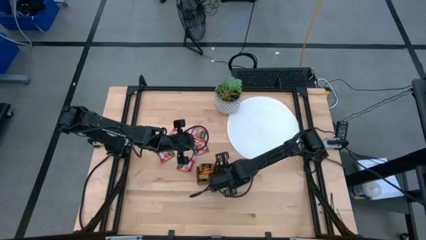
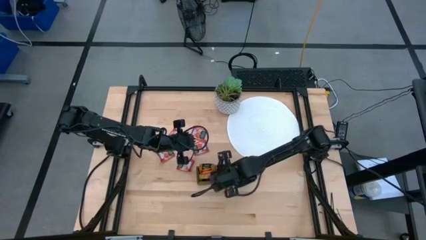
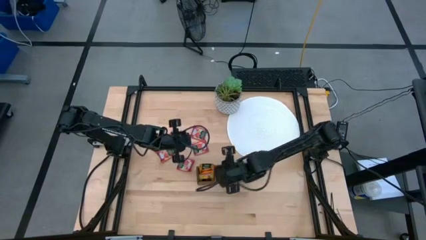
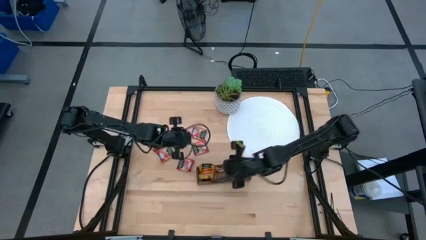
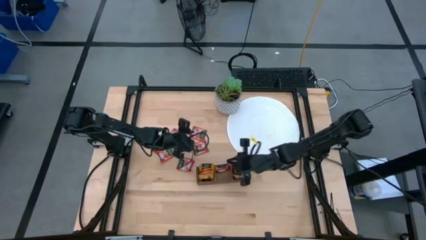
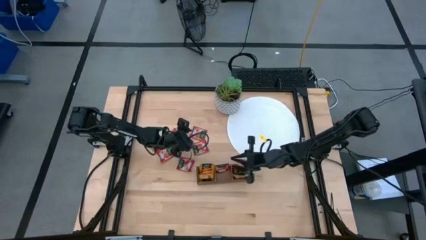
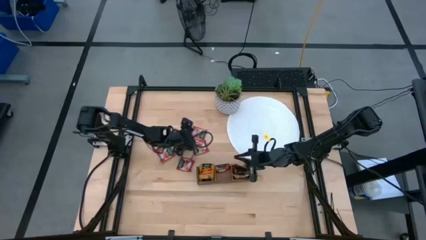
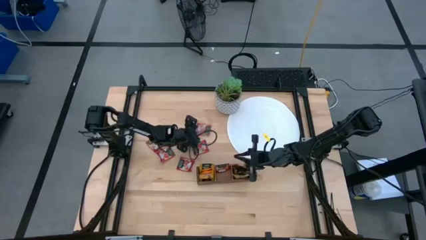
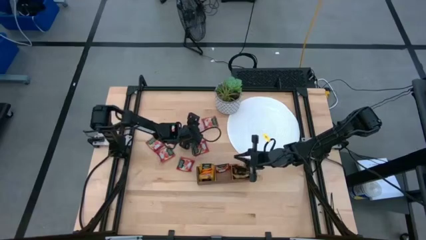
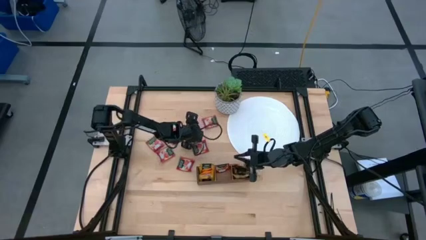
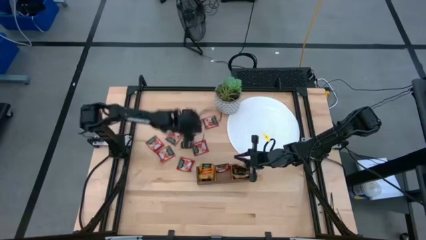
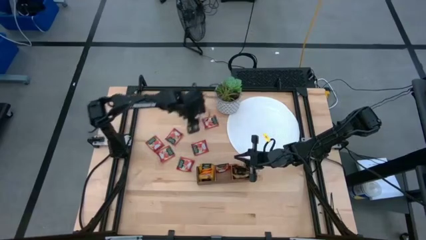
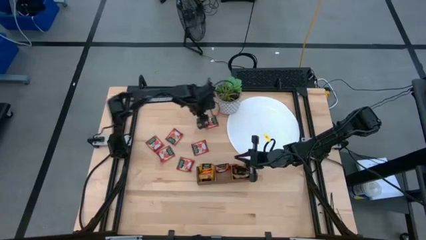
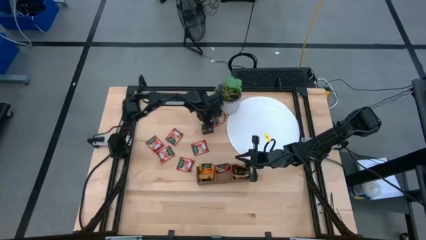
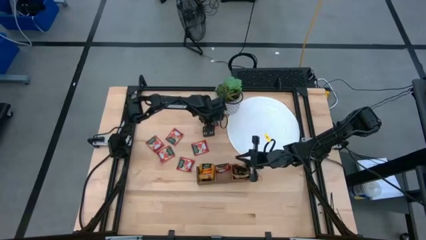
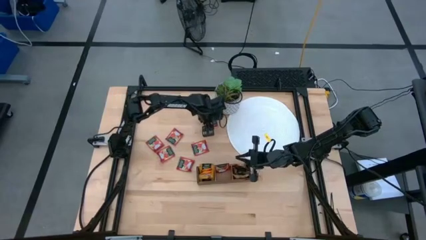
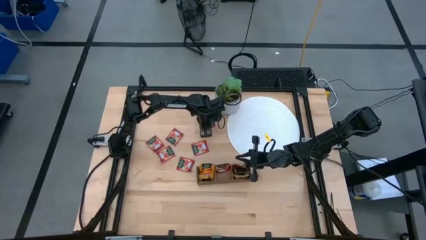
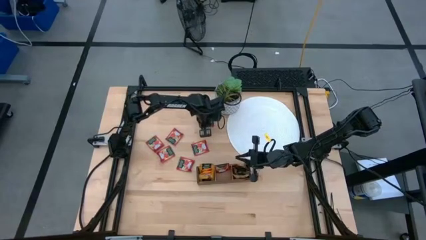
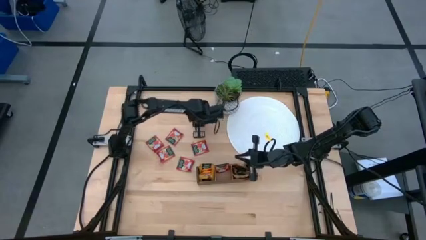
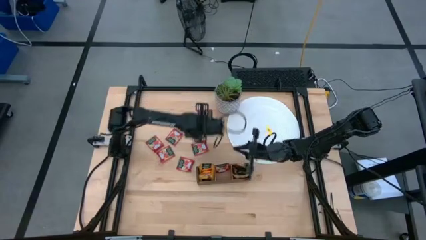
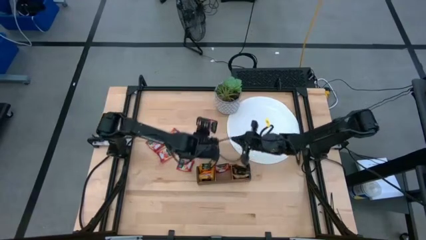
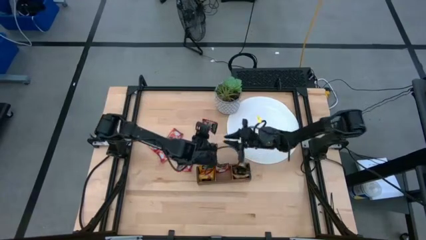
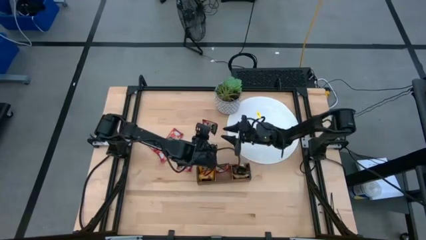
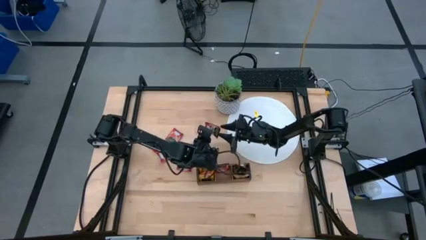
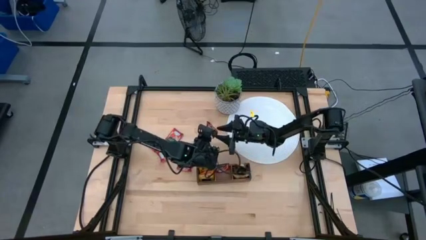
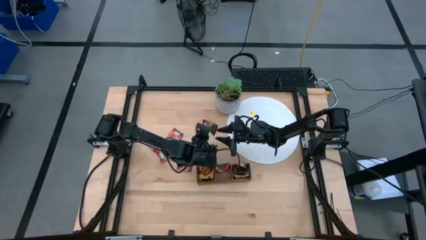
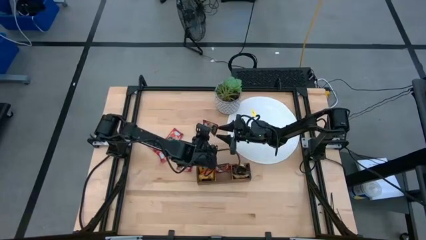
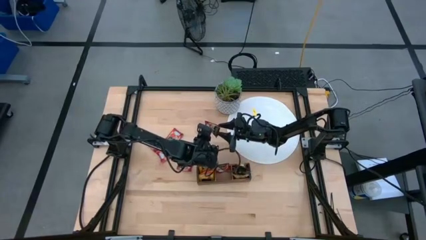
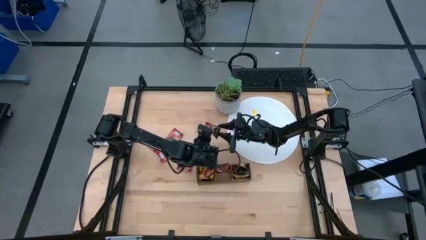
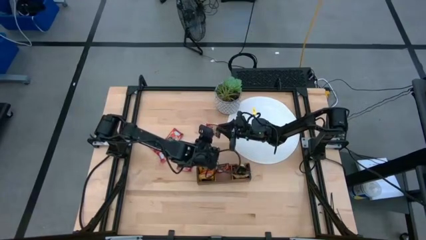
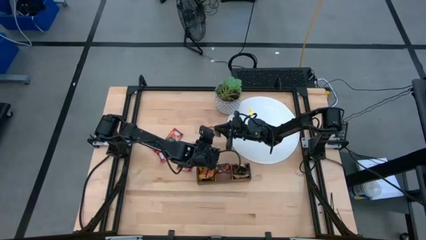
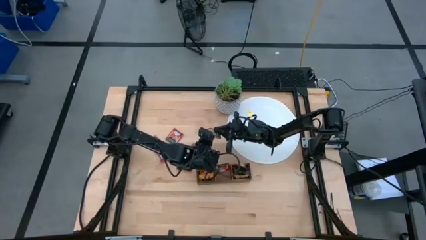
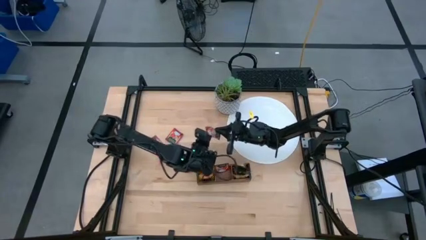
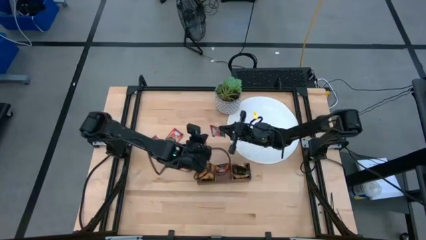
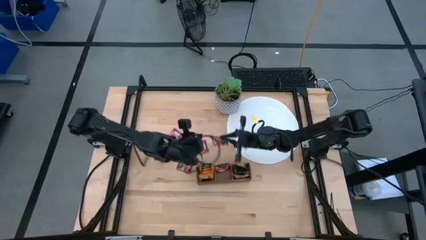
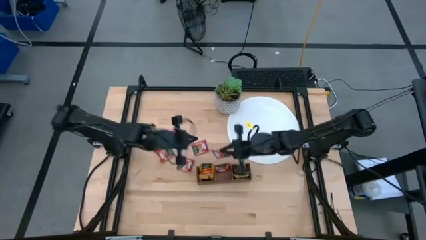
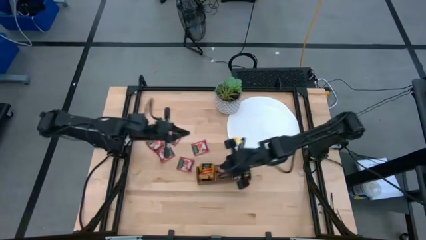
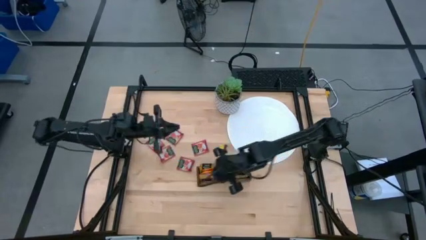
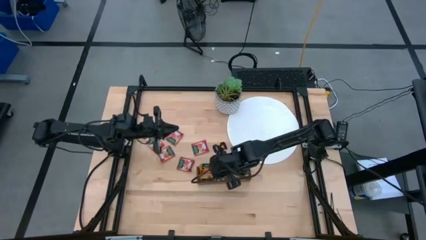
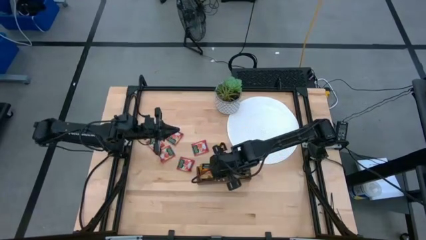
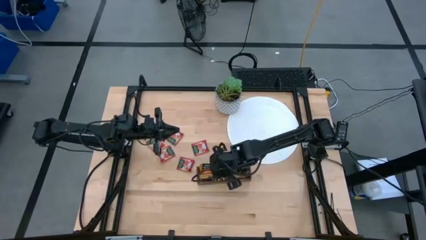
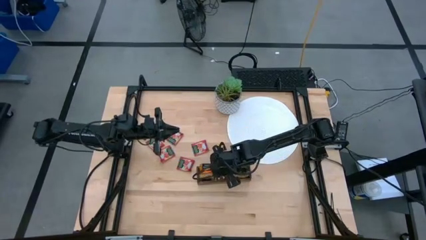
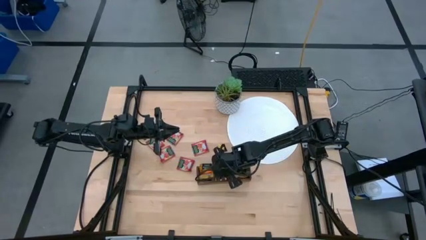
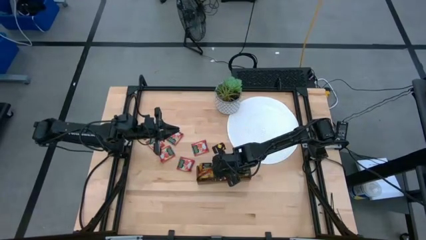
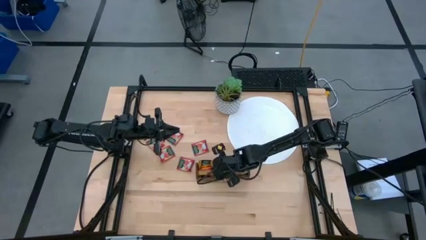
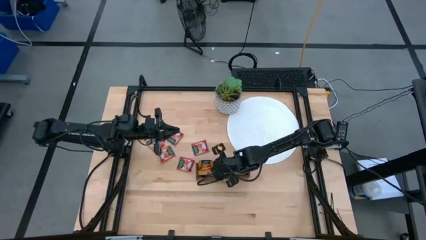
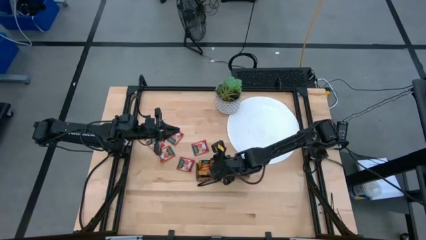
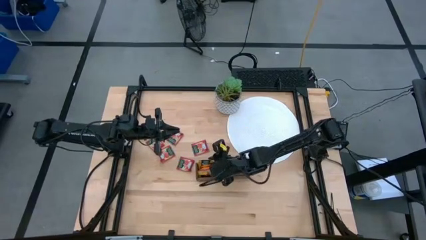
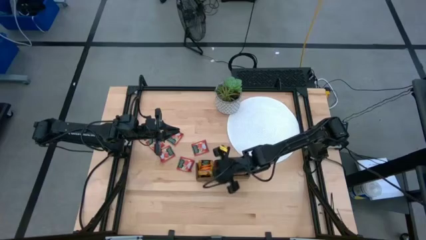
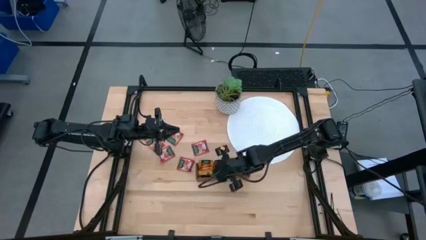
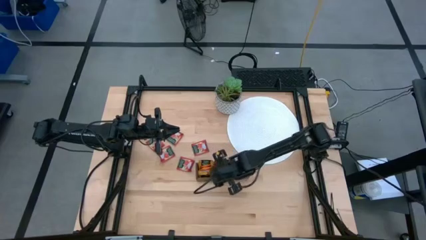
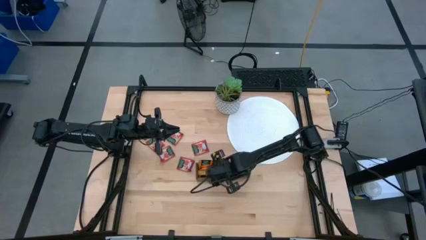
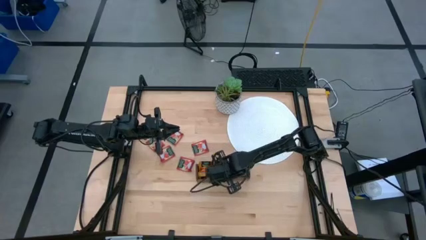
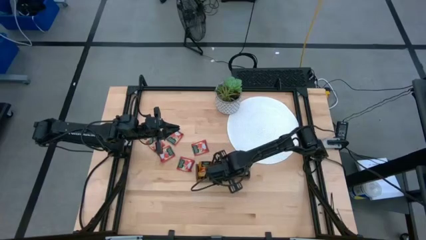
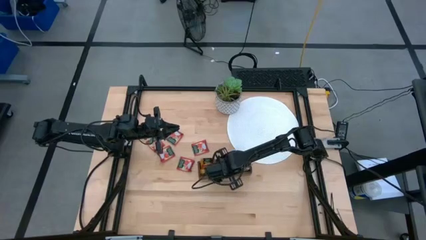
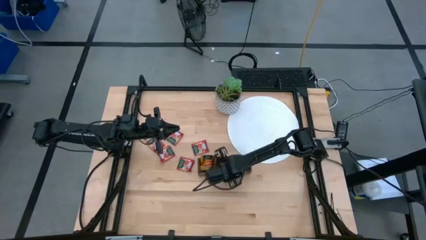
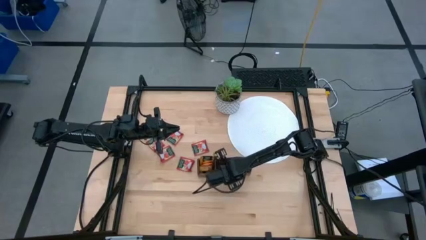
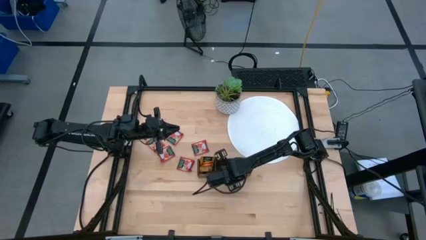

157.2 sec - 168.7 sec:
Task: Pick & Place Tea
Put the red tea bag into the middle section of the wooden organizer

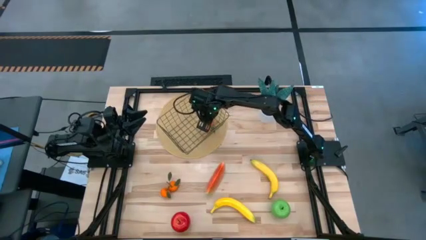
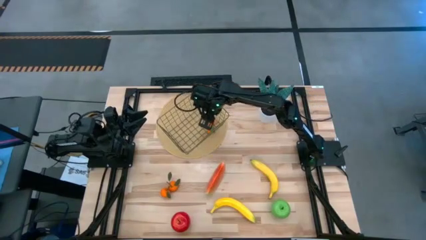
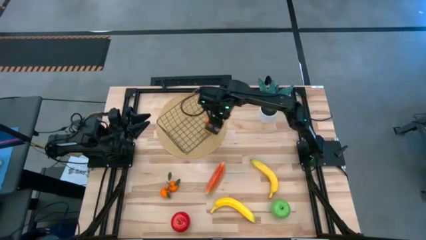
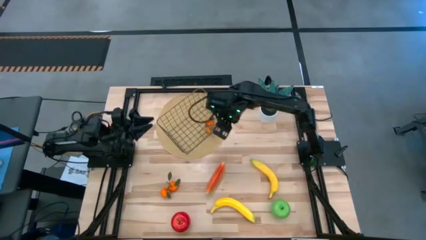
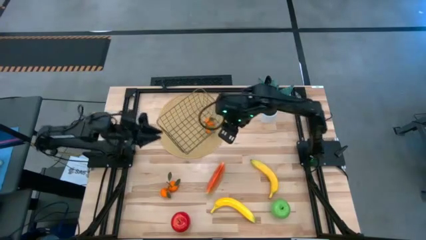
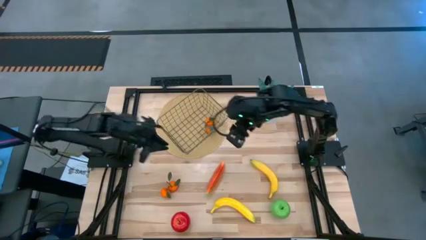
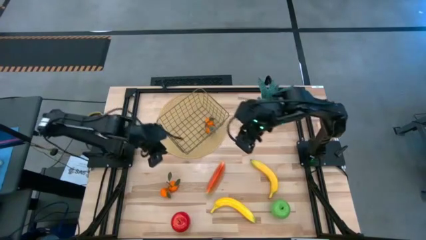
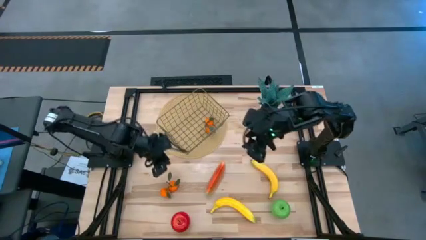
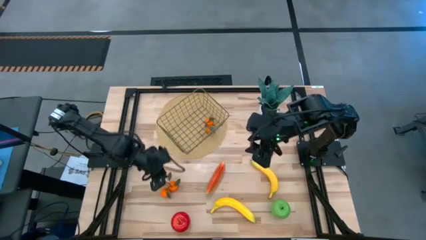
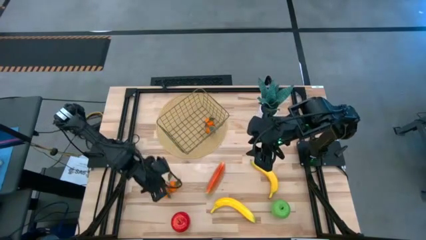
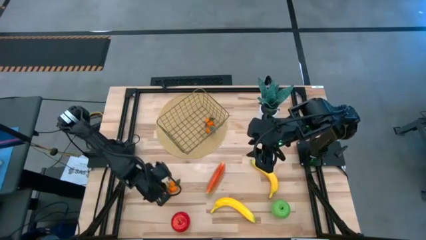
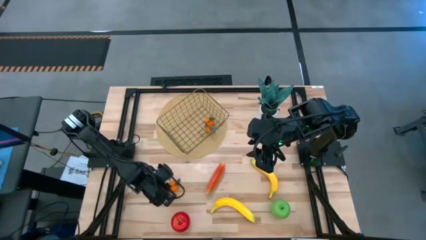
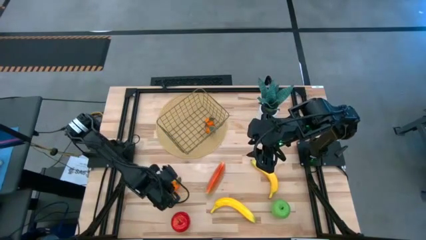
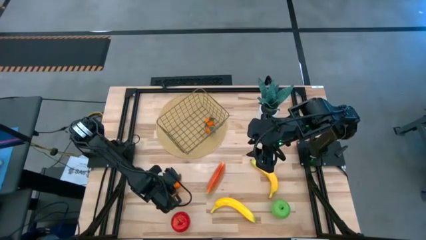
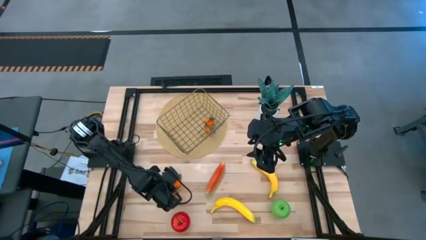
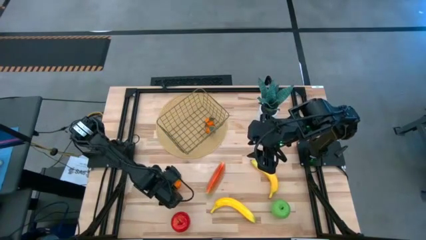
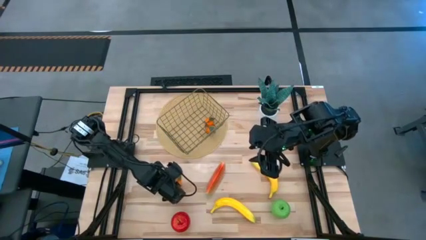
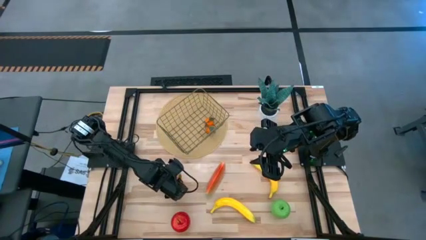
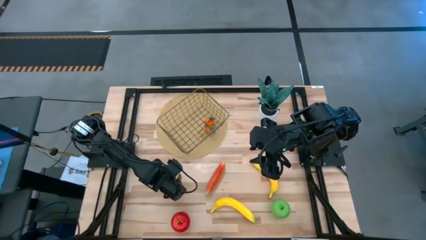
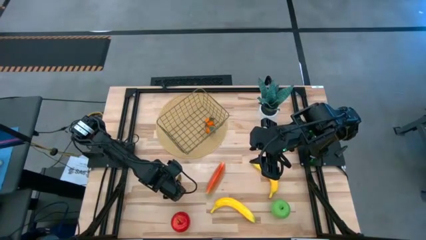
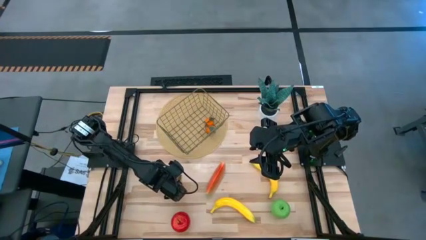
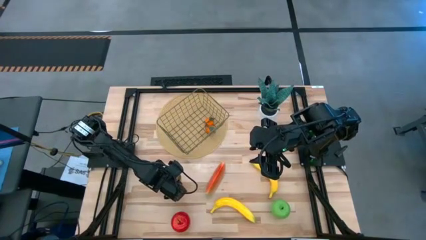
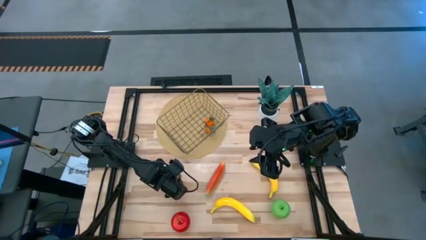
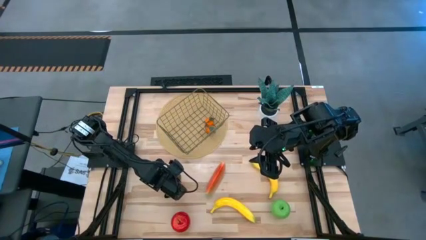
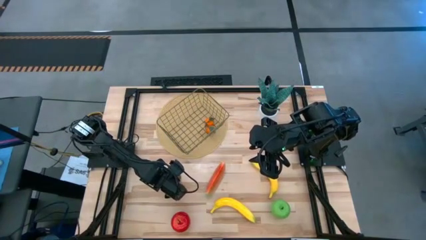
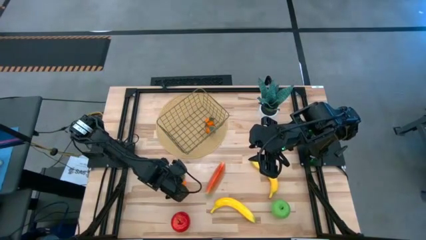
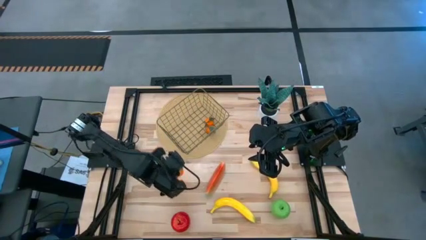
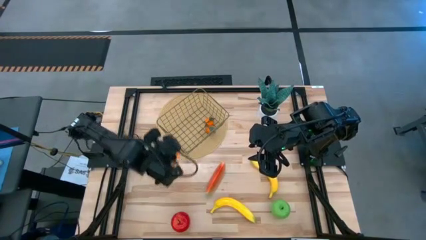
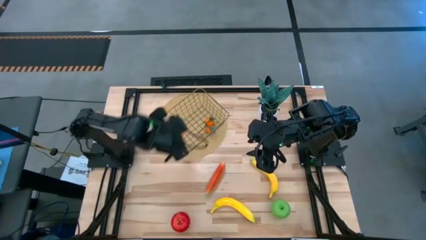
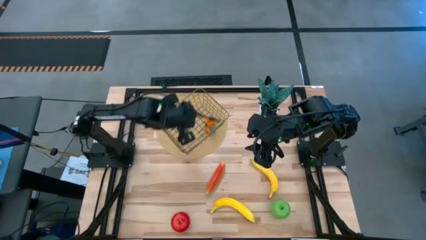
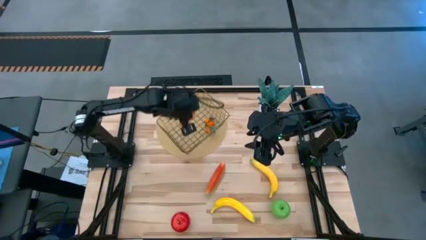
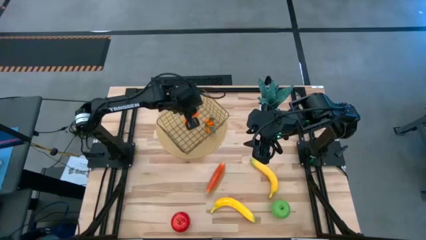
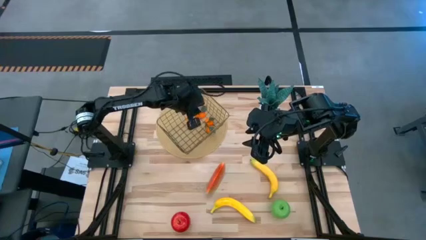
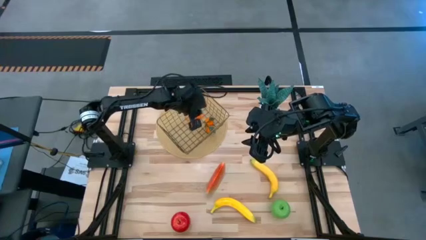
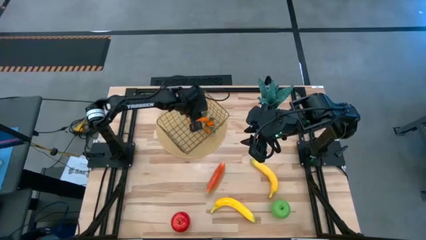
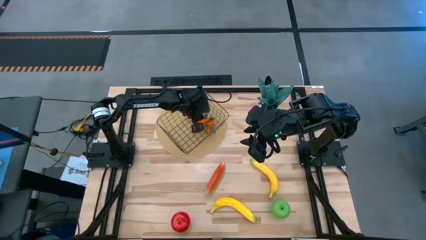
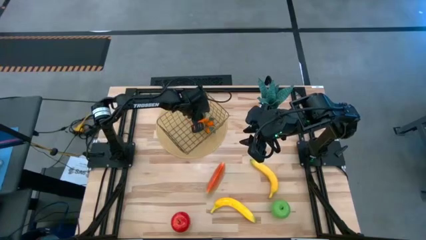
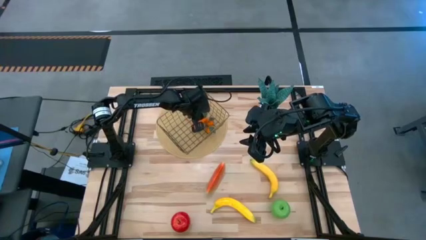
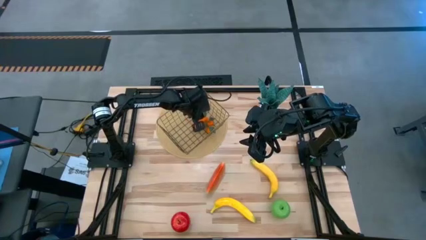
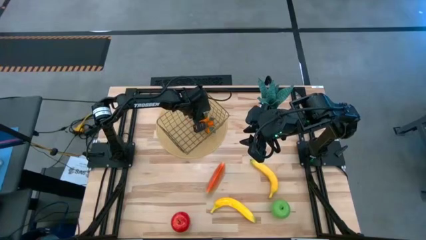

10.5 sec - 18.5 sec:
Task: Build produce basket
Put the yellow tangerine into the wire basket
